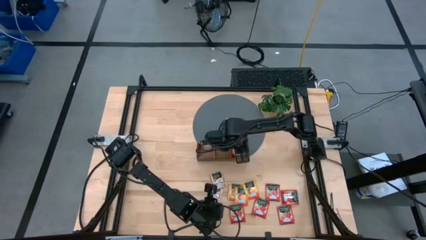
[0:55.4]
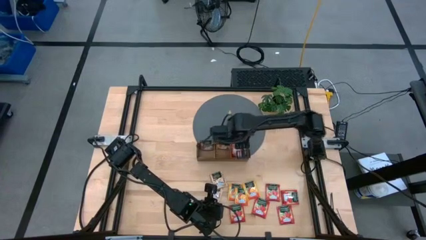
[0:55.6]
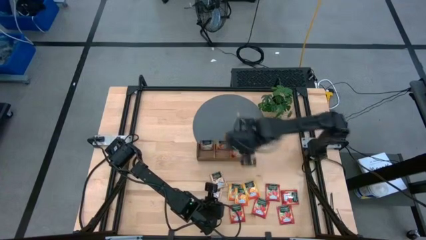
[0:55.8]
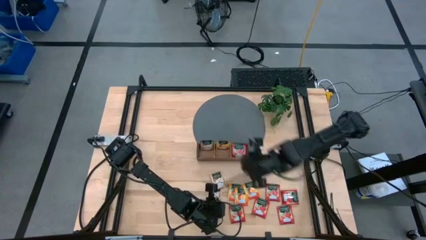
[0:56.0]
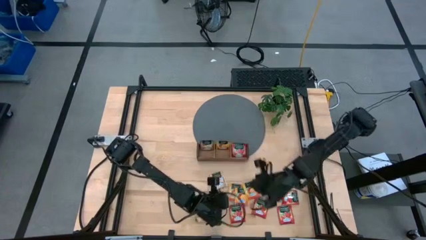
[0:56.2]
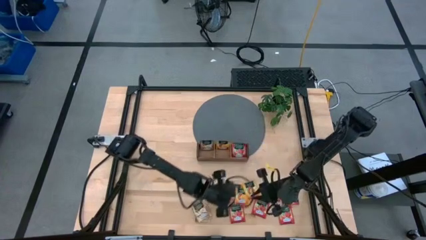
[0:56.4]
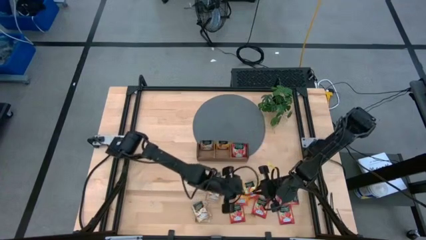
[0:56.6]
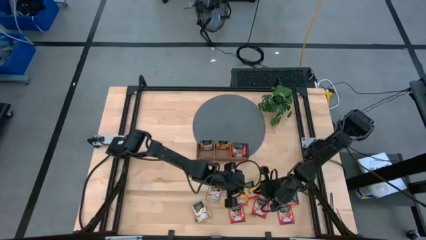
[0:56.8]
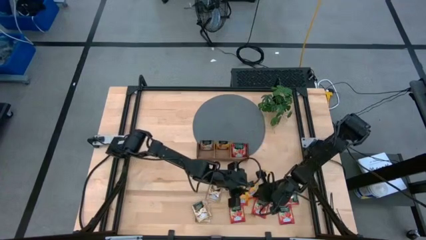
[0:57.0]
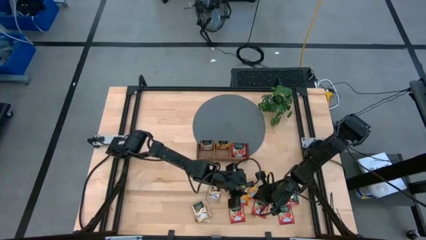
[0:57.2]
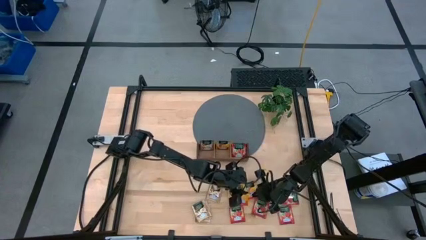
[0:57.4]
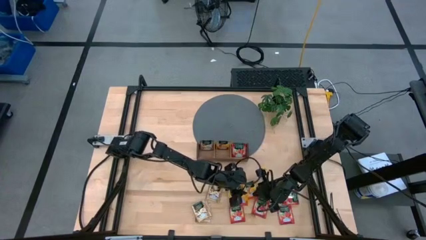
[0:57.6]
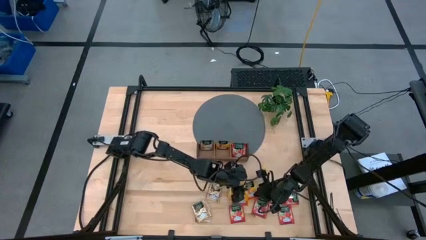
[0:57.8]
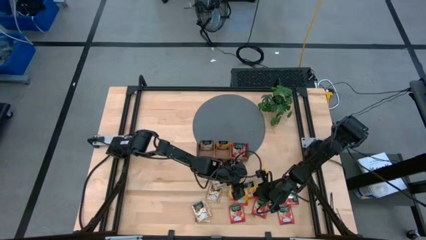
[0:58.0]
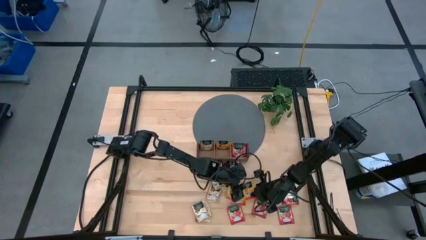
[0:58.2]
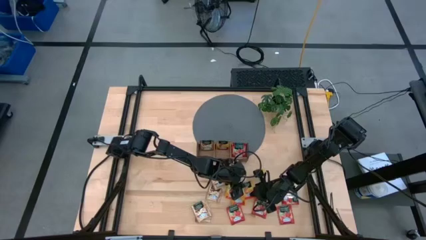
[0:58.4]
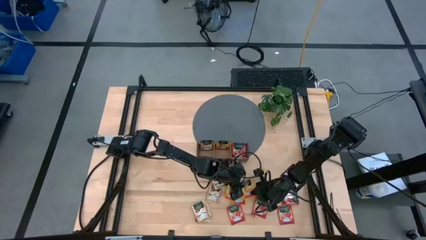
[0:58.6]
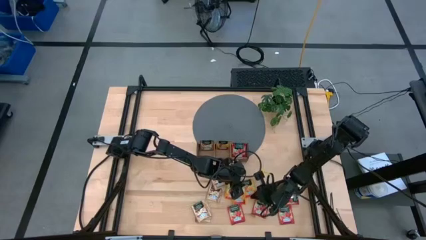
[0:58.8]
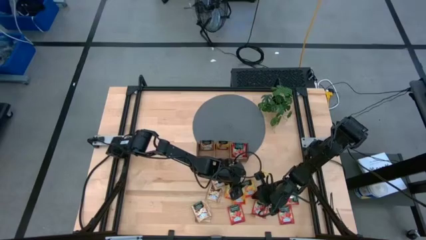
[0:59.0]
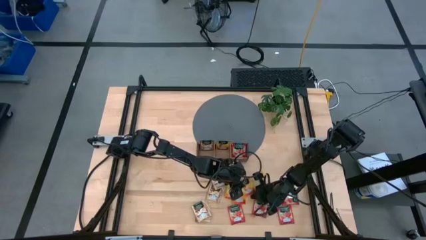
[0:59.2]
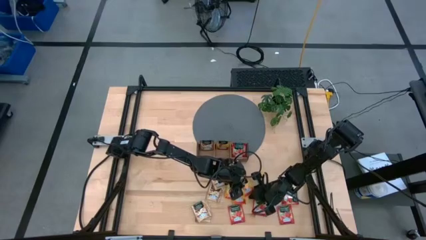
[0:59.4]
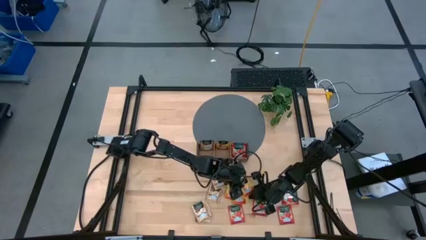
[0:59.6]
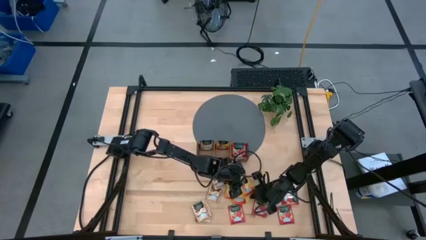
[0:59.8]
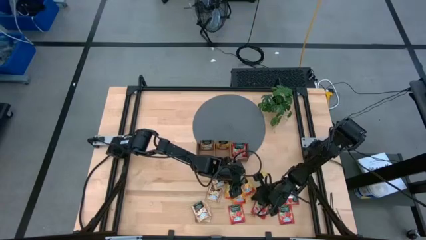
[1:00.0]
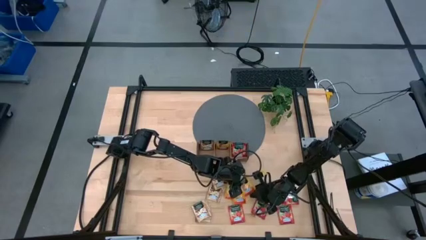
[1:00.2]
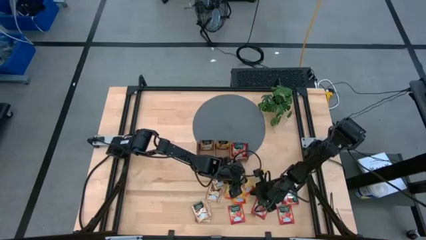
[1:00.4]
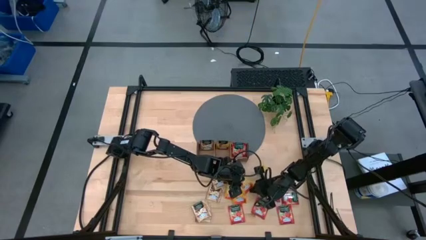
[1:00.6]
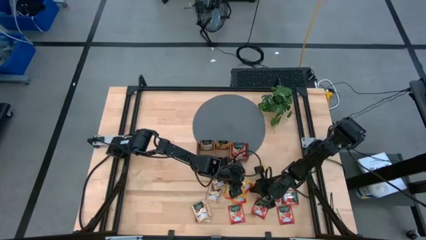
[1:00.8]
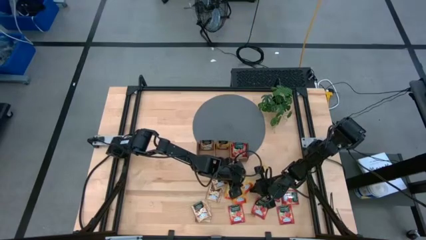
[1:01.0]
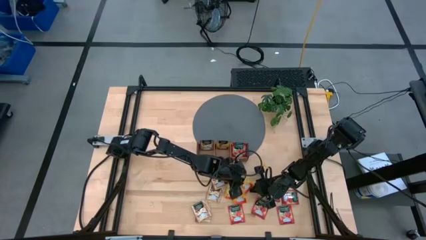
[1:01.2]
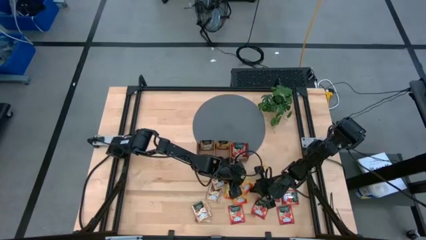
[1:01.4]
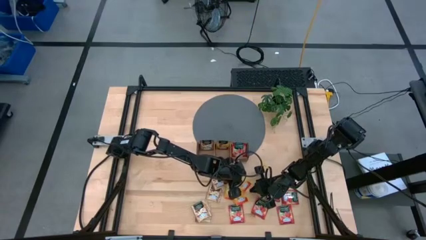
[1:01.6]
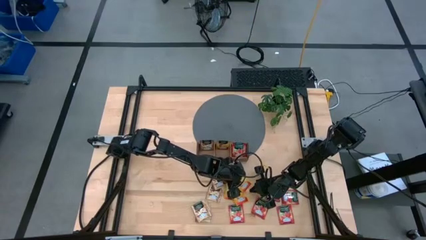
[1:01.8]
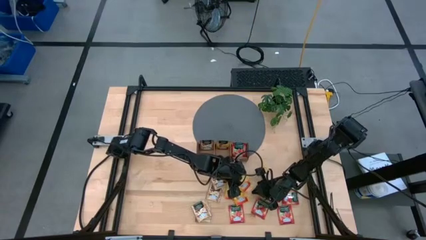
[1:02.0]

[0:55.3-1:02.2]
Task: Pick & Place Tea
Put the yellow tea bag into the middle wooden organizer

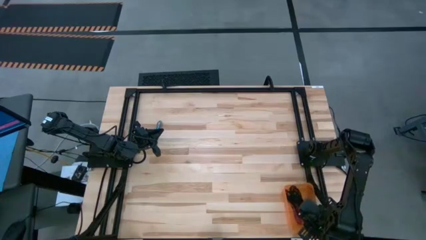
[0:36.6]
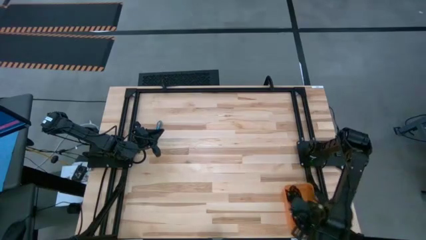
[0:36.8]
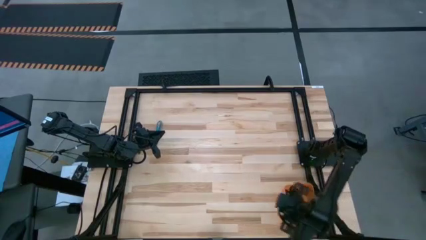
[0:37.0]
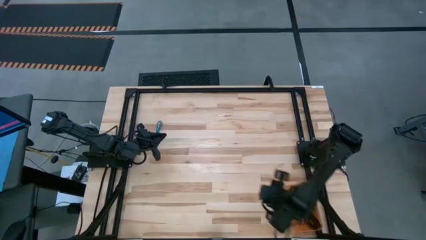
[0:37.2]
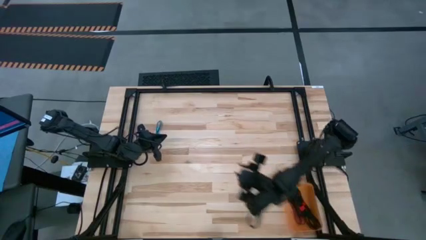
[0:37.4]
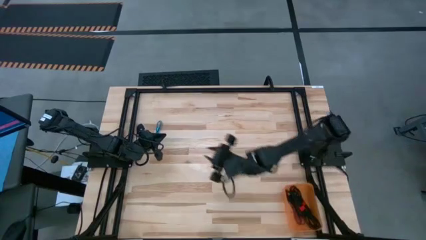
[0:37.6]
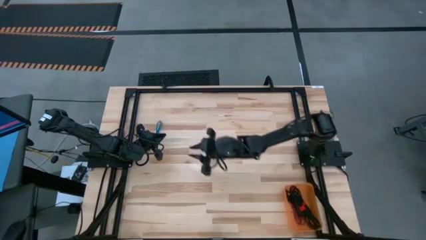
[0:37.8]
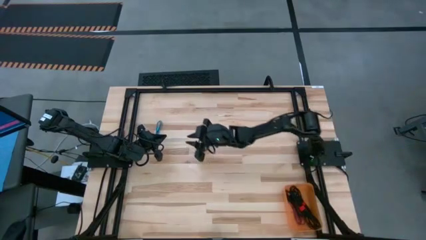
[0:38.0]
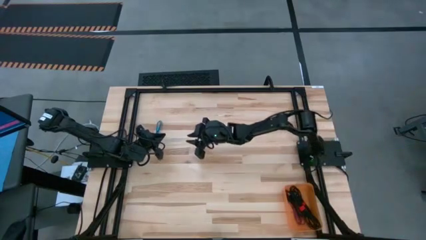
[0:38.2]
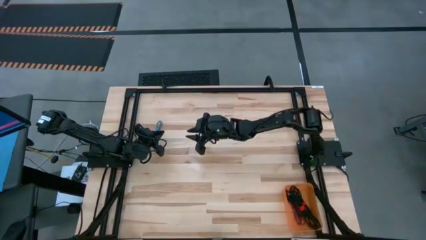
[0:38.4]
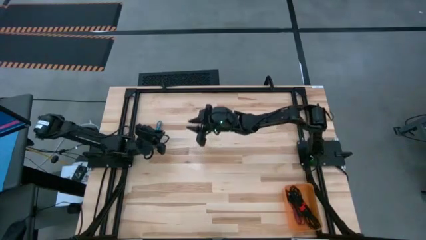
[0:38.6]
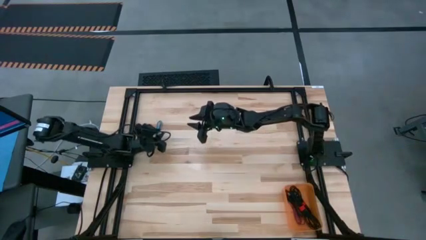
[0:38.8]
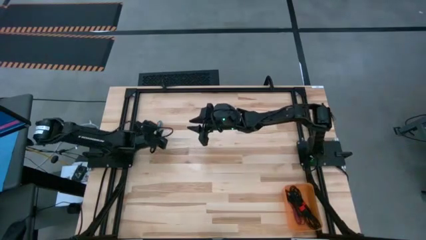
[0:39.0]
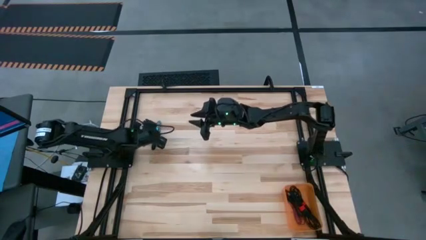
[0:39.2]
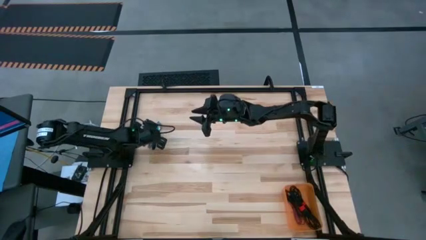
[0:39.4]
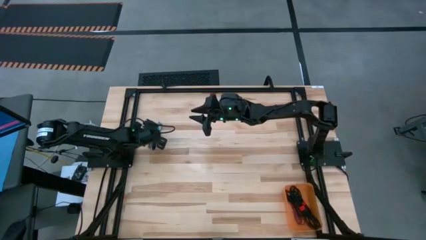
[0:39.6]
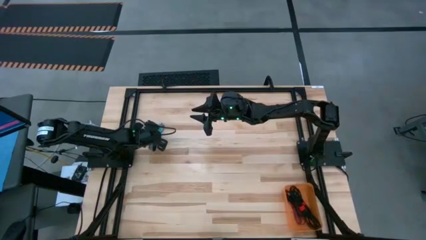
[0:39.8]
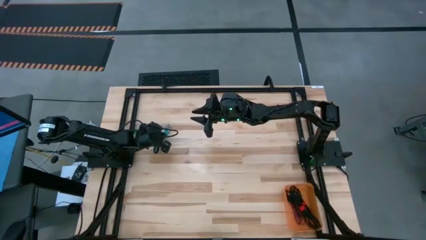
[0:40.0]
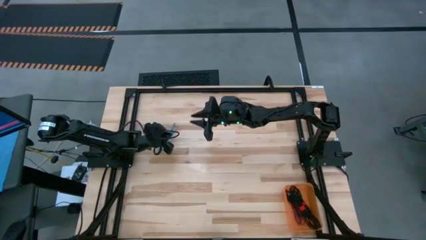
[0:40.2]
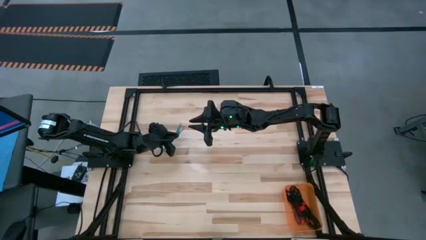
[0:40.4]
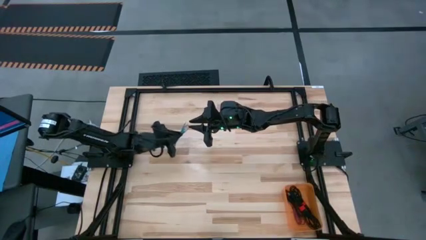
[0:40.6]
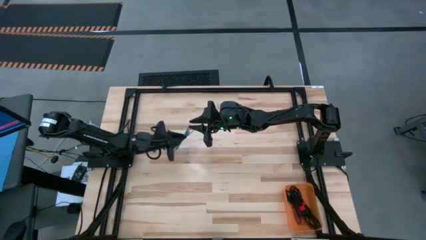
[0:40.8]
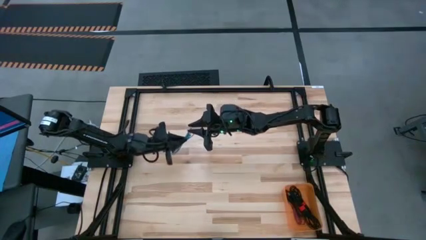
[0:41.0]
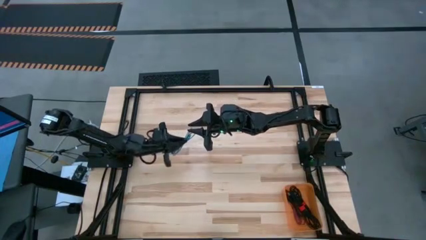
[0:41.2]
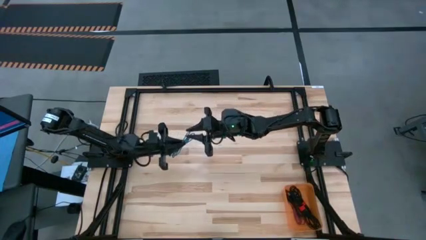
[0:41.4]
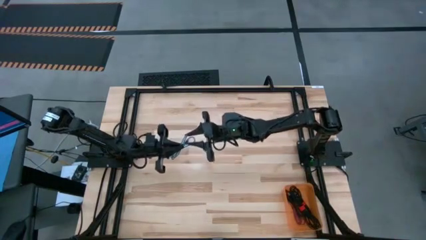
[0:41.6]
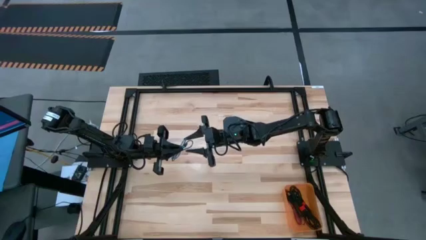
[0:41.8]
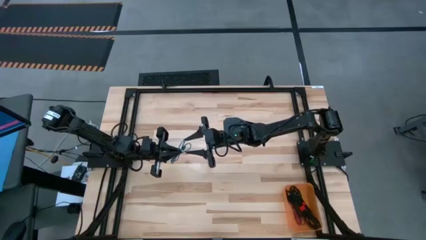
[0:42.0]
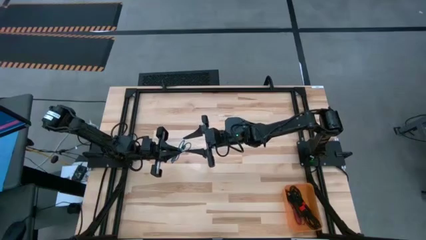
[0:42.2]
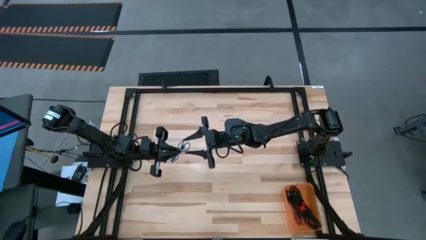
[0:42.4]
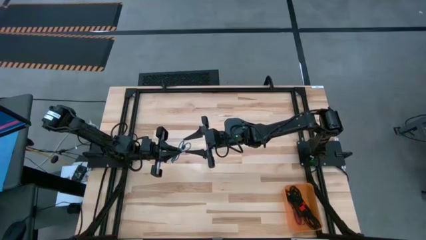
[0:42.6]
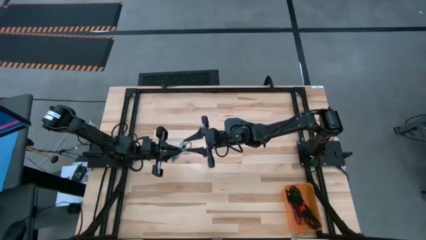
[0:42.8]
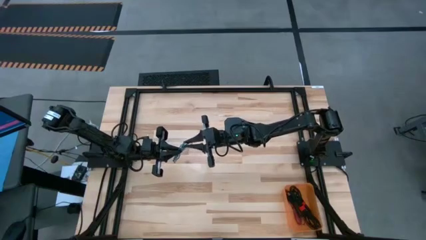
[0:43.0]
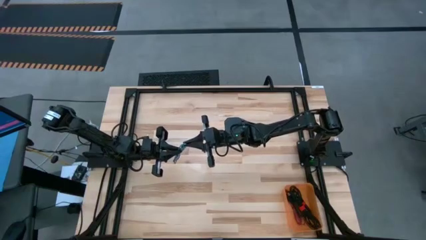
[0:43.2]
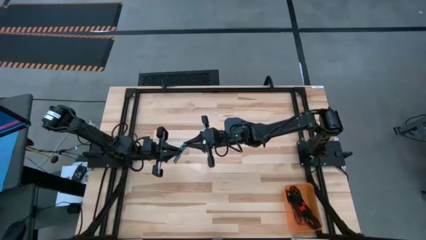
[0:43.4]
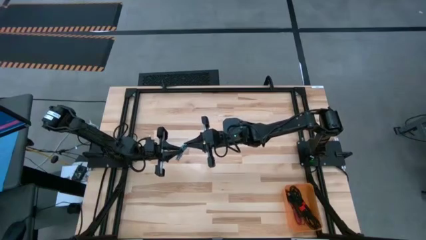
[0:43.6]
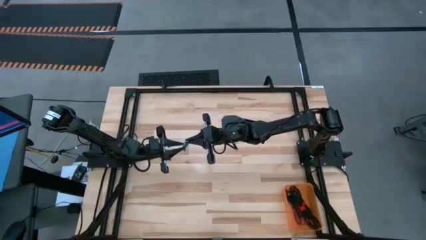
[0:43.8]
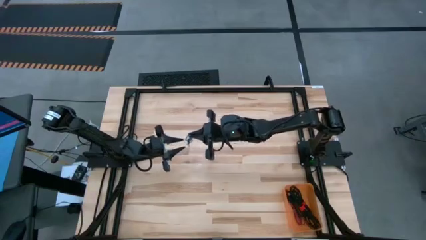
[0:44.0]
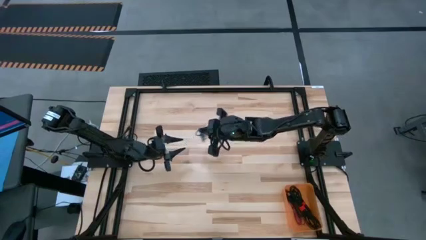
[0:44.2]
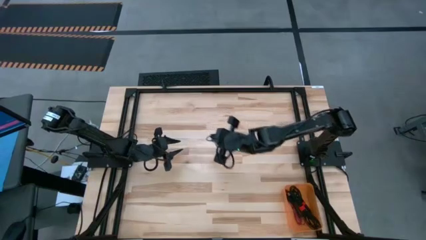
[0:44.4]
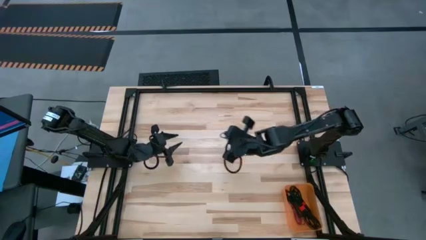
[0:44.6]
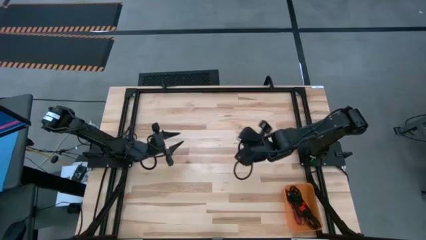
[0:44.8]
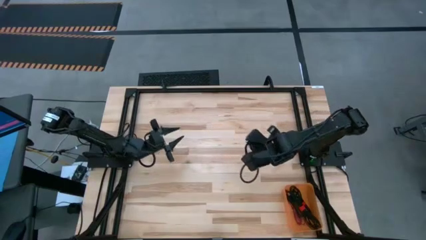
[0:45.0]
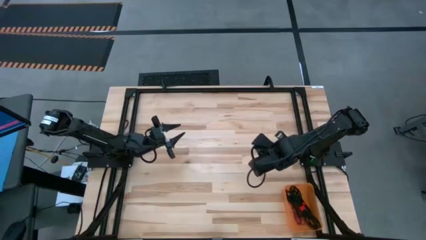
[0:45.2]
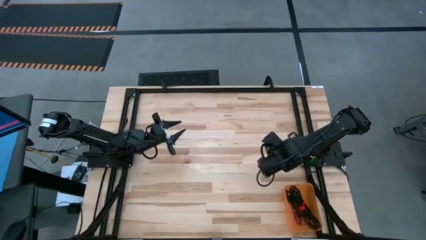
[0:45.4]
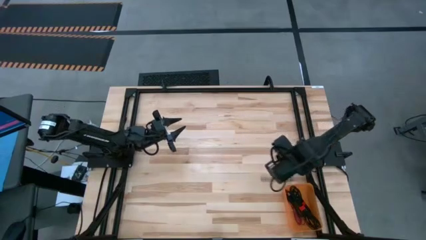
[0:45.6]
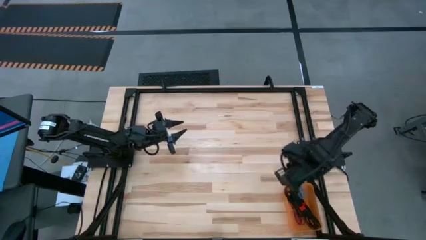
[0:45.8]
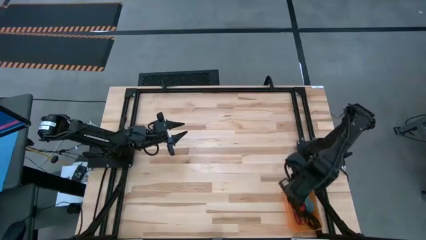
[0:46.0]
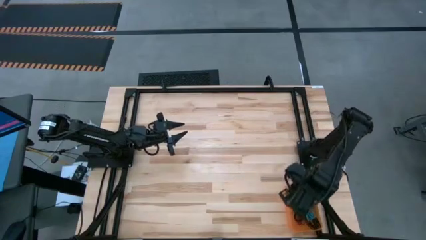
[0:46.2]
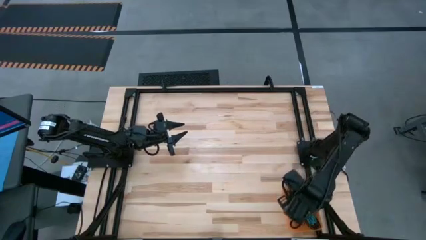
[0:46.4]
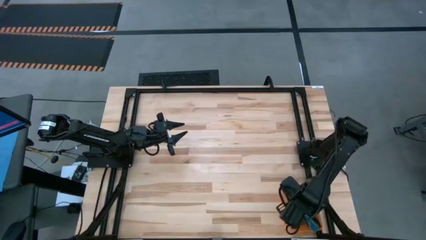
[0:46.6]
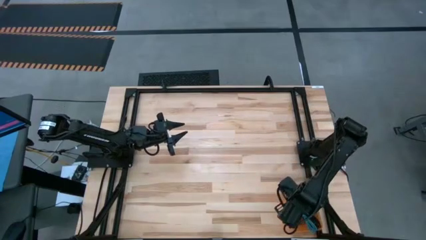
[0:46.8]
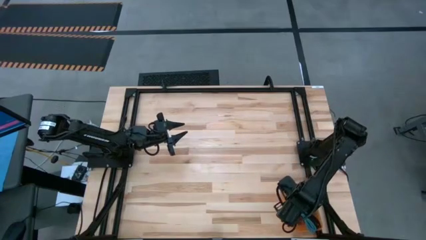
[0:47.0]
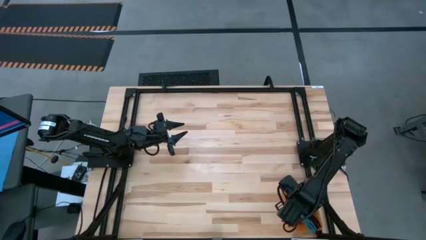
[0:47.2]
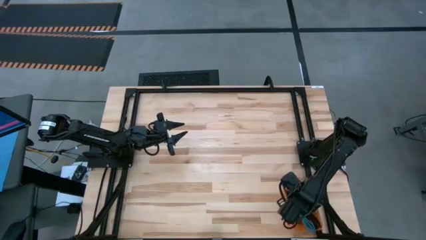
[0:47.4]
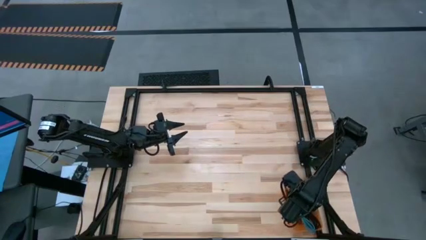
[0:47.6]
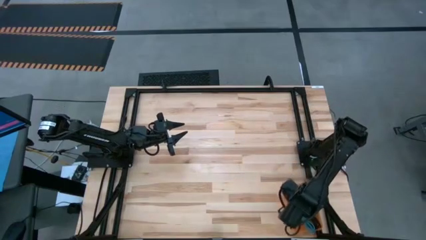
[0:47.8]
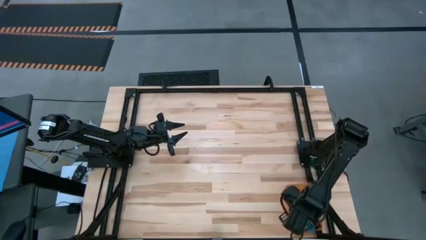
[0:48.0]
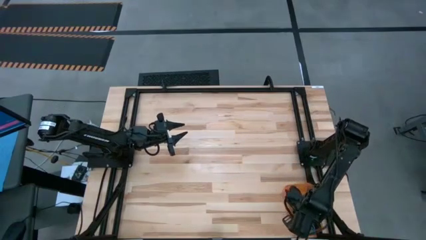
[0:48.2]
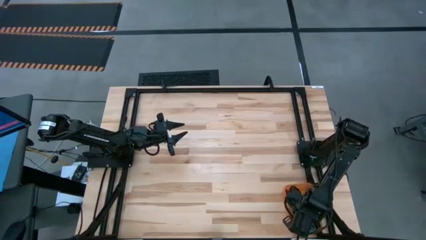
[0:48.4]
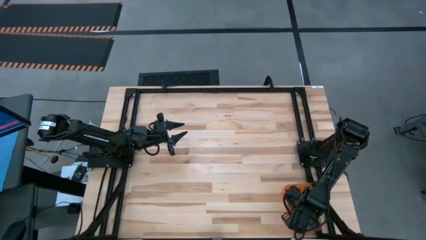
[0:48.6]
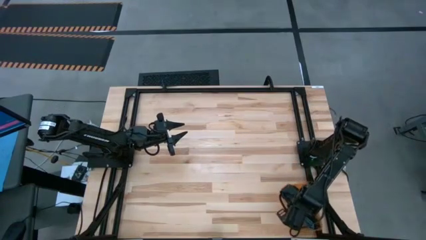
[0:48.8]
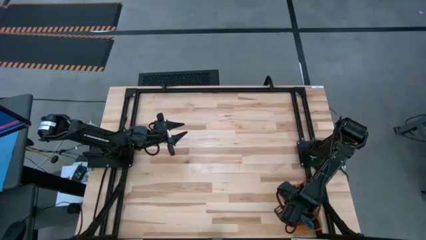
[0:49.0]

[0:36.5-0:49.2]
Task: Pick and place USB-C Cables
Put the black blue charger cable into the orange bin
